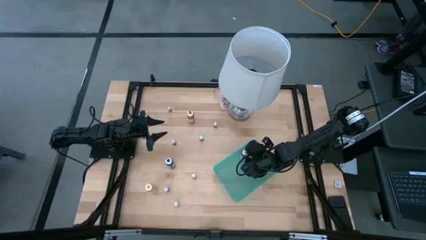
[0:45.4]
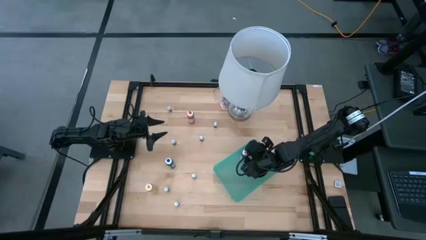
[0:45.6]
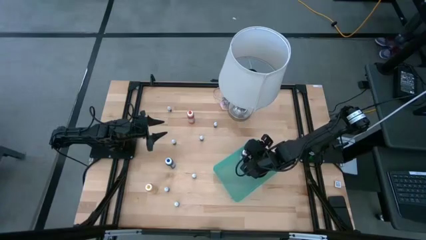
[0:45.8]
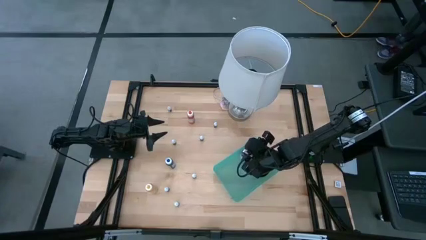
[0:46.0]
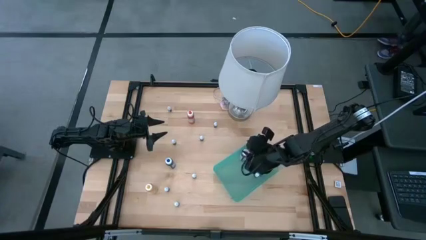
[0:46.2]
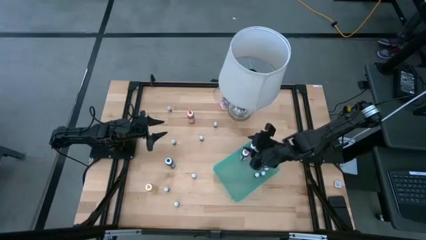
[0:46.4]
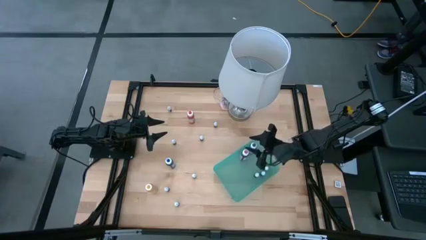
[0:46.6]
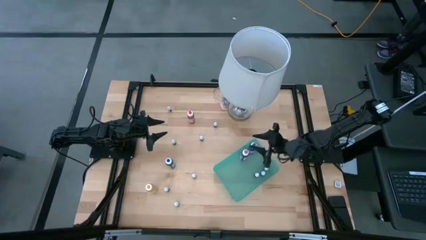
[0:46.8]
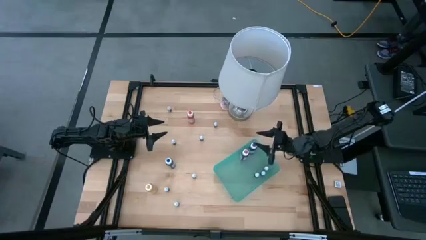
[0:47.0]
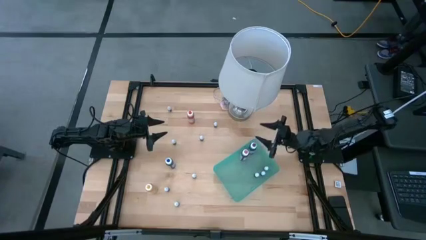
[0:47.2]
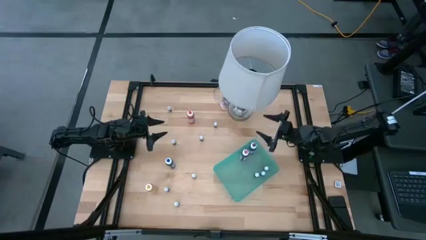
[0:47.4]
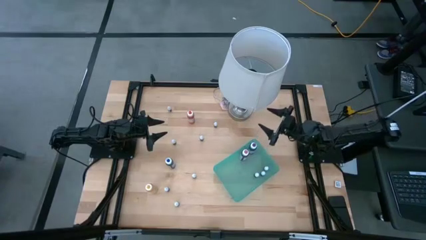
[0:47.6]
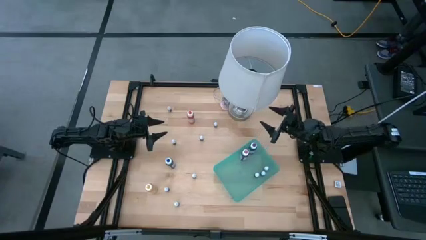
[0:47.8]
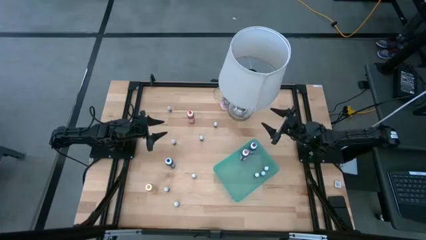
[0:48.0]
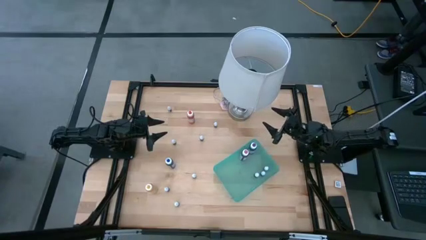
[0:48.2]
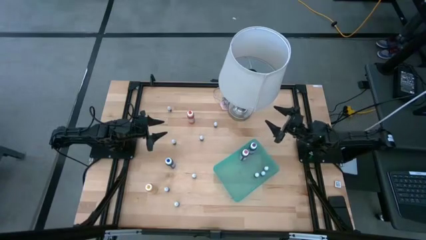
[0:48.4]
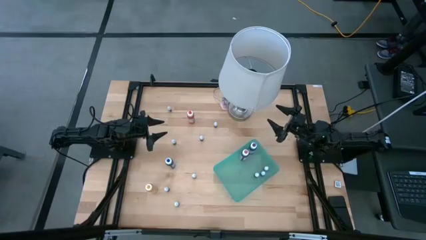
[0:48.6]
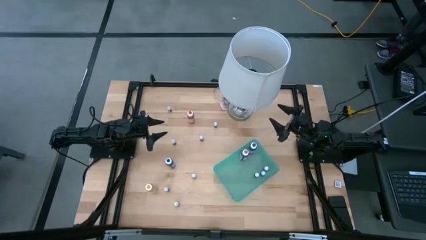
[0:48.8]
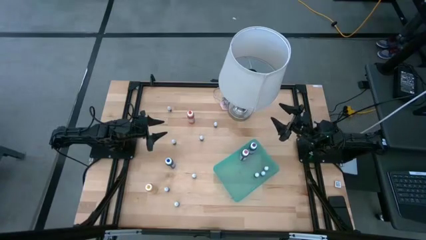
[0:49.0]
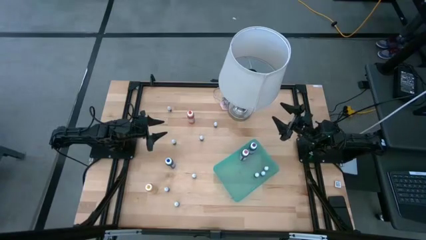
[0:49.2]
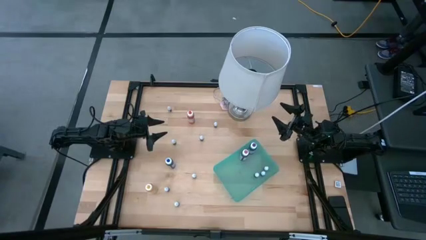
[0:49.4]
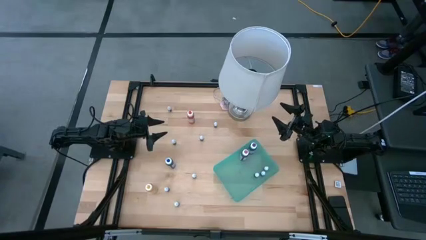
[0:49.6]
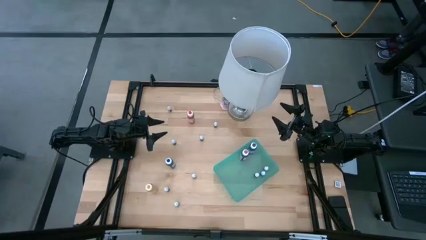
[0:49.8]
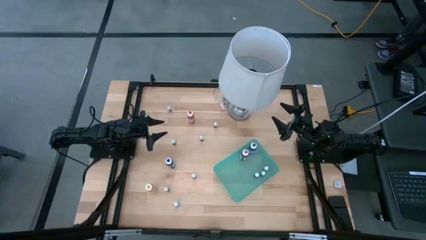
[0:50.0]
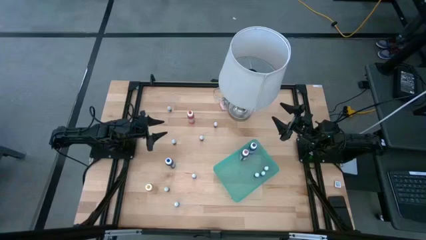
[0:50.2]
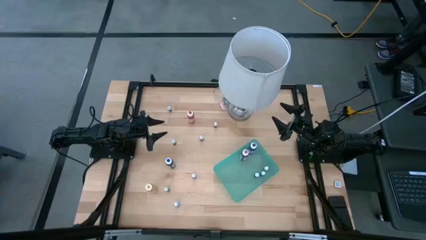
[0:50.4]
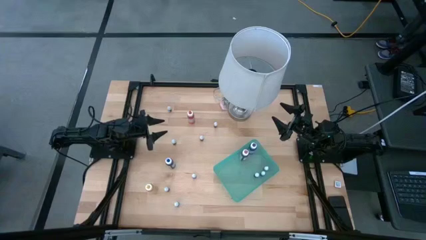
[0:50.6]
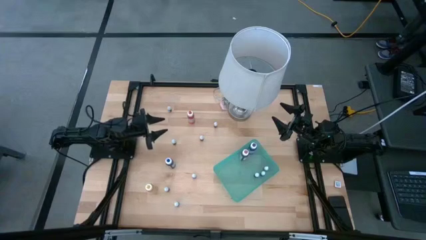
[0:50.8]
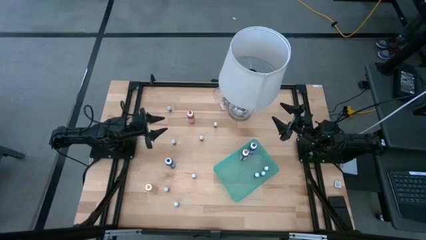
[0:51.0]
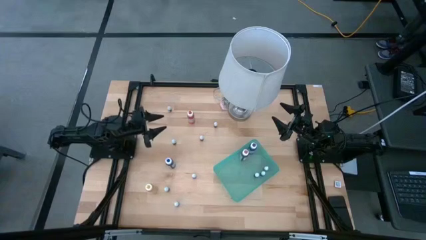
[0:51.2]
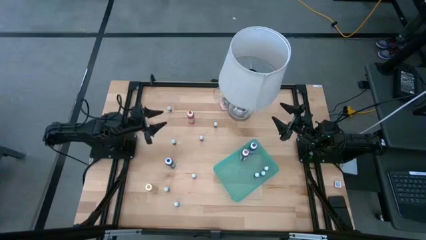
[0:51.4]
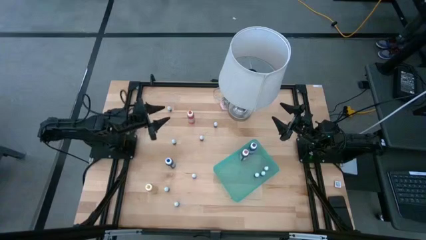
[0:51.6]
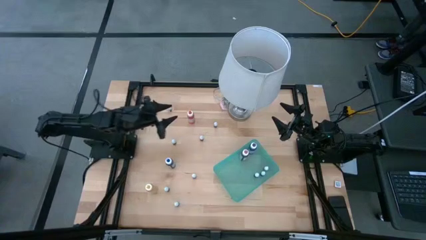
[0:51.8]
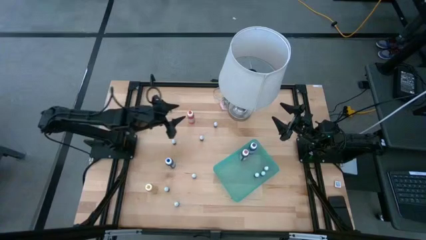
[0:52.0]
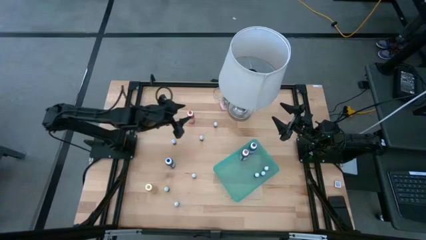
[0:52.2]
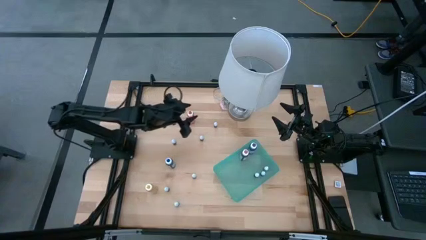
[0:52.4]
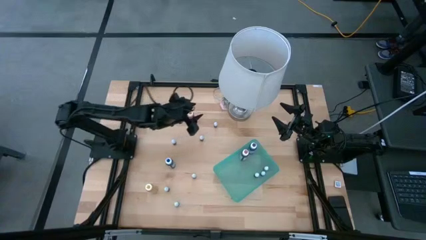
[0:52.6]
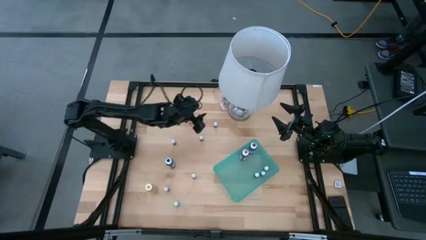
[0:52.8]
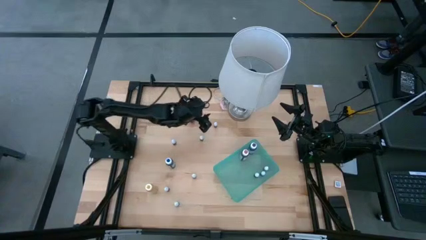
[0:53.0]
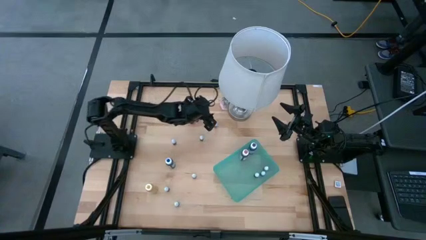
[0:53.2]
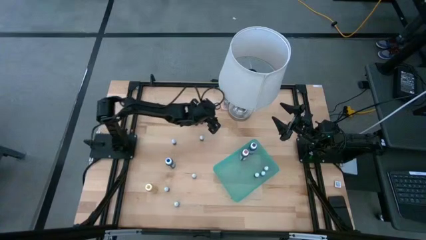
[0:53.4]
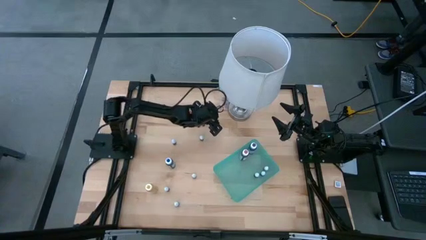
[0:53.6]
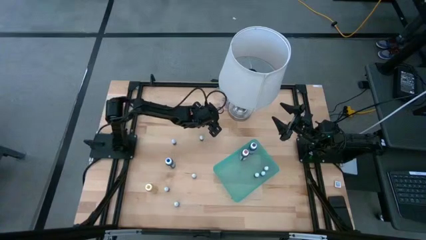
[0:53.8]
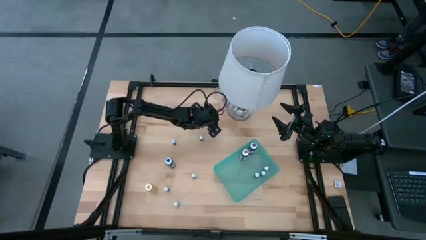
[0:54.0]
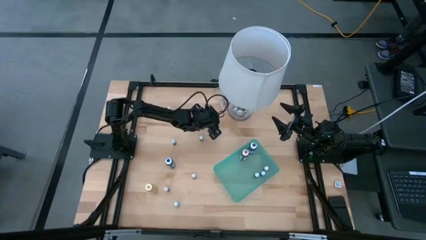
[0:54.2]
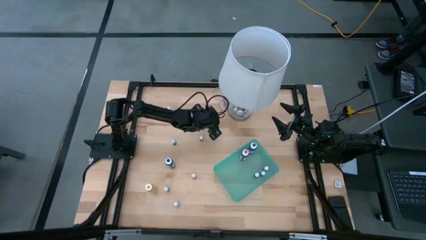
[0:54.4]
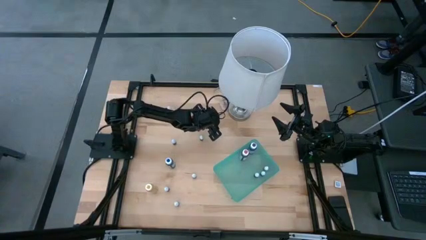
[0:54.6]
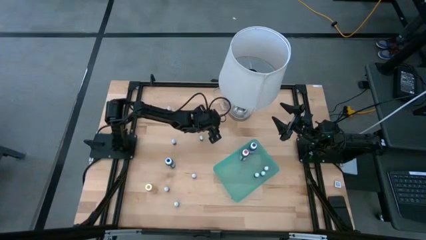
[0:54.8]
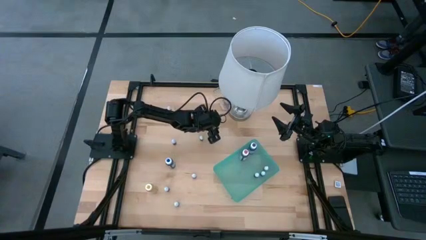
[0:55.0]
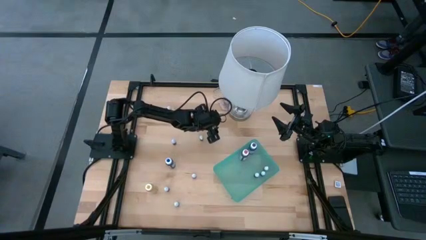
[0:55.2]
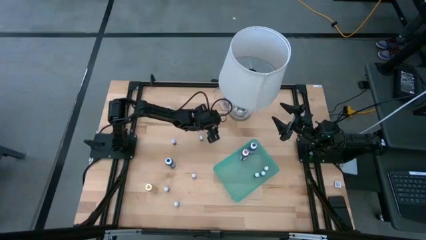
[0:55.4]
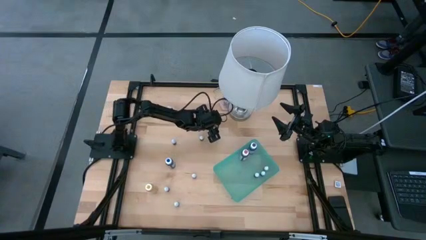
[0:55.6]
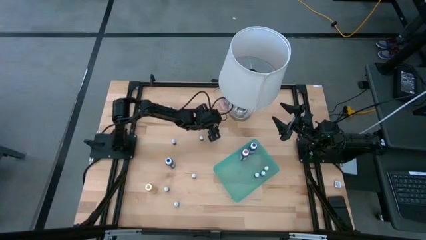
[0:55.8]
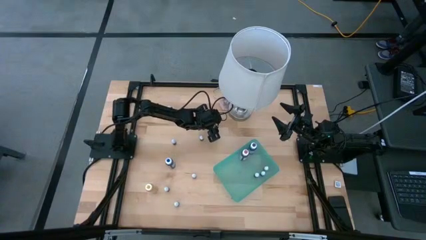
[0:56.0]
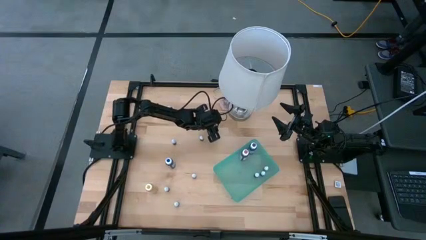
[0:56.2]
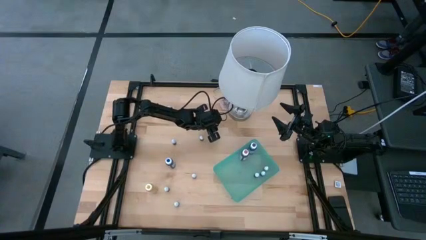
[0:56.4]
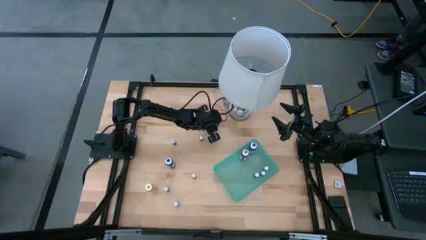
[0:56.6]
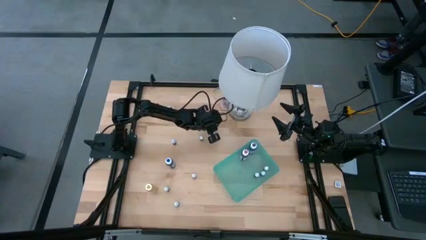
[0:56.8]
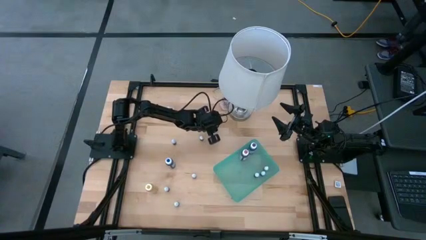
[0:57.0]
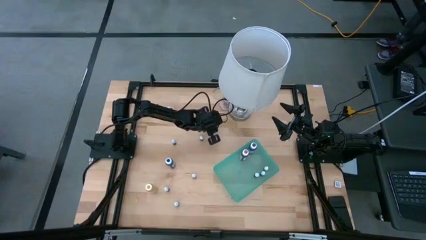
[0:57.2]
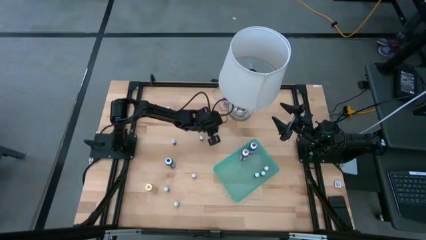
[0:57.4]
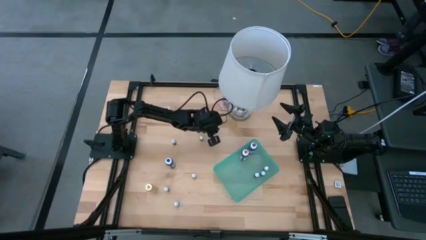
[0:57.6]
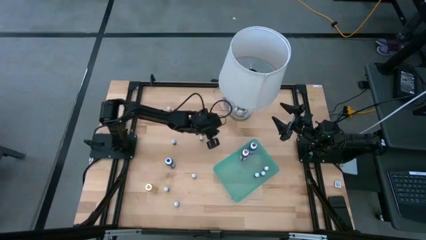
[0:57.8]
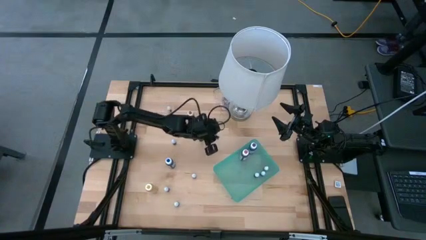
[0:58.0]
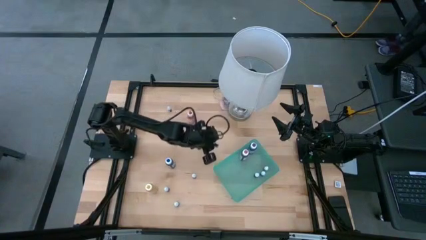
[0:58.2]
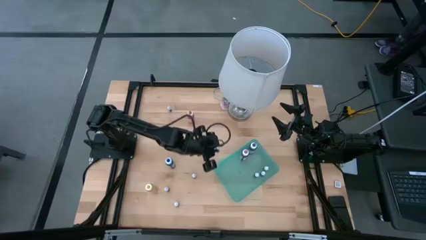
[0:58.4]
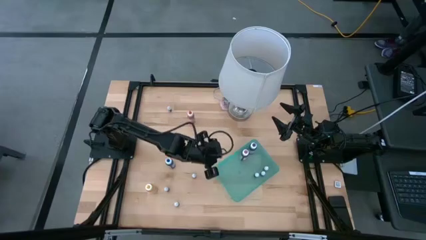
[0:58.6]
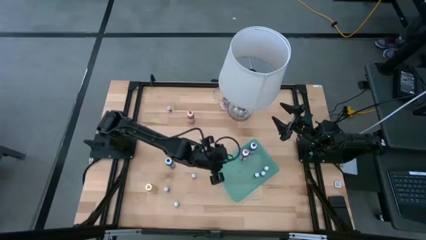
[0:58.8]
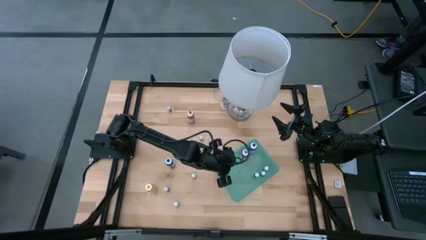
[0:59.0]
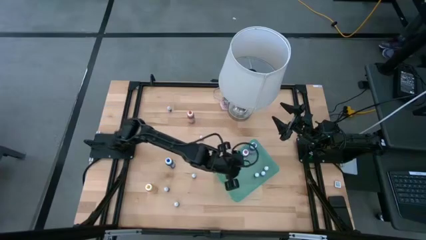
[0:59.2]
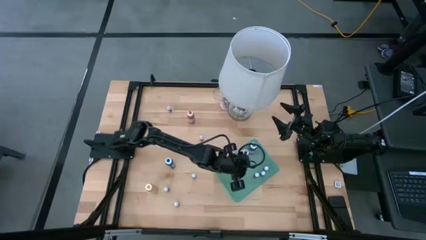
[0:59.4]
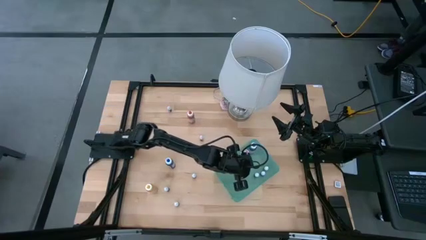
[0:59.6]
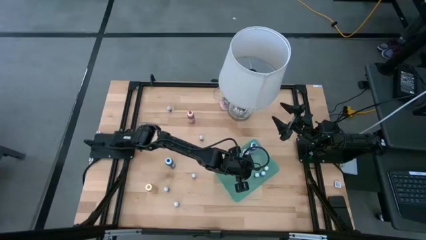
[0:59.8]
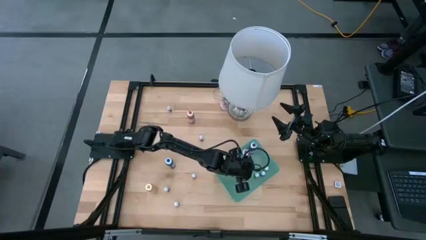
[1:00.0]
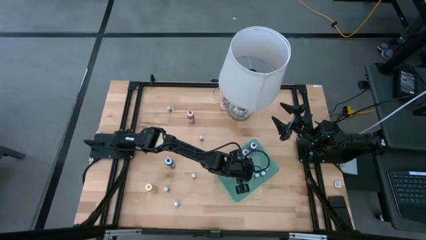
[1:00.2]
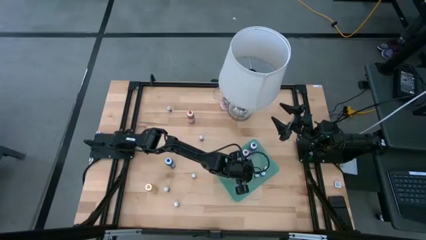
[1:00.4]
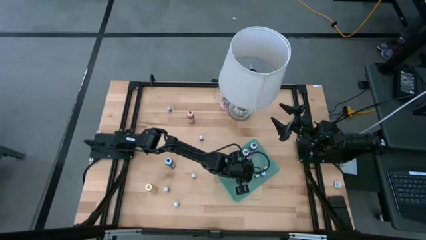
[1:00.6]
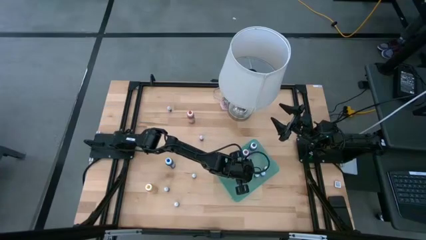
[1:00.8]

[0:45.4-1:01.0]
Task: Pick & Place food coloring
Put the small pink food coloring bottle into the green bin
